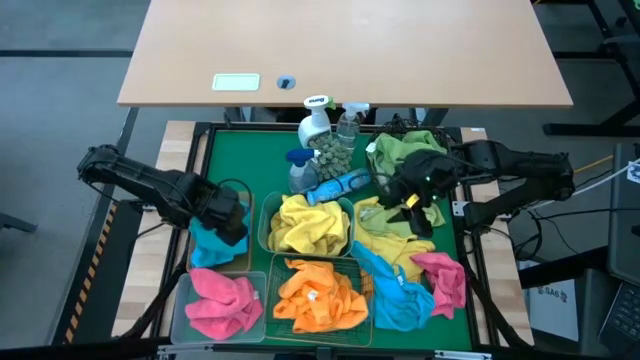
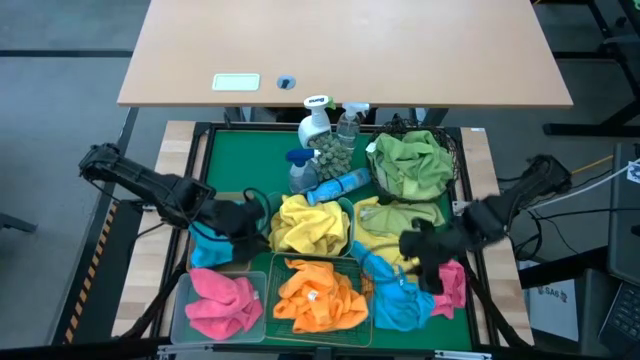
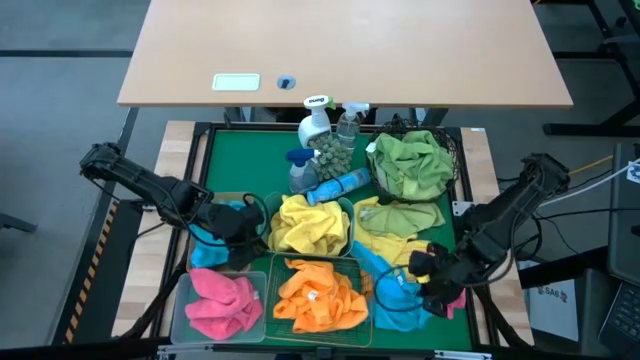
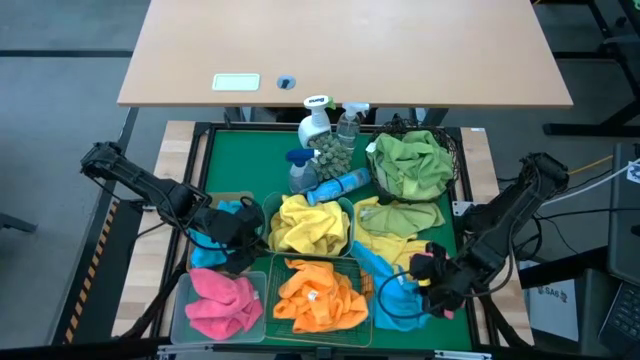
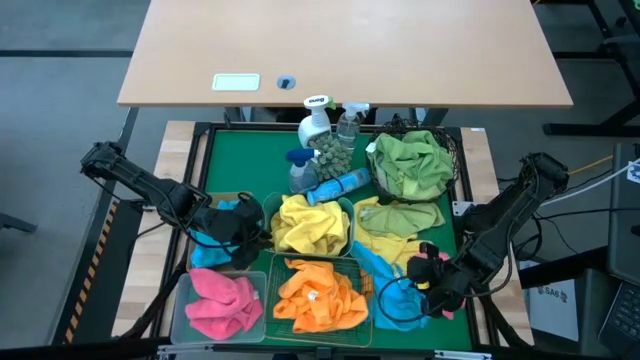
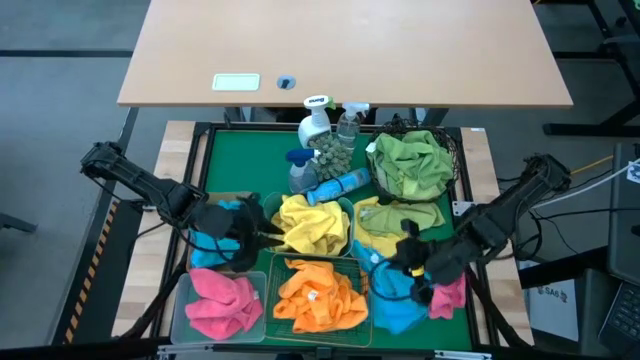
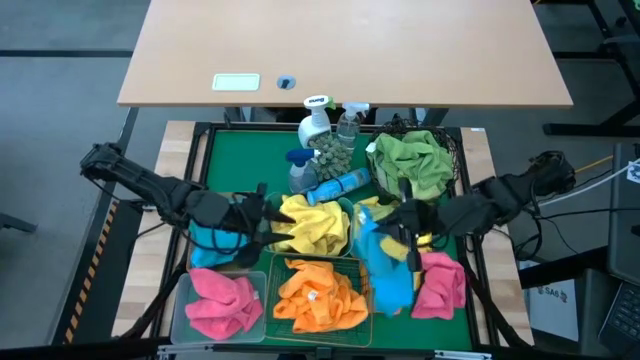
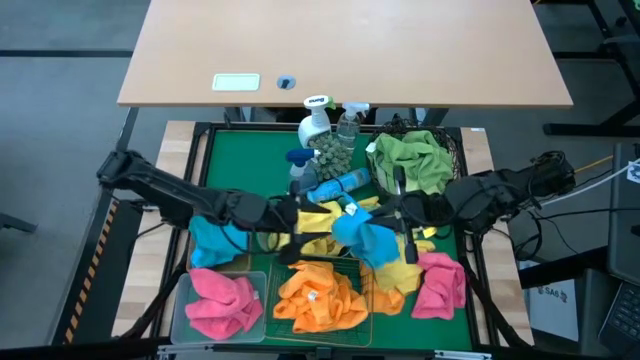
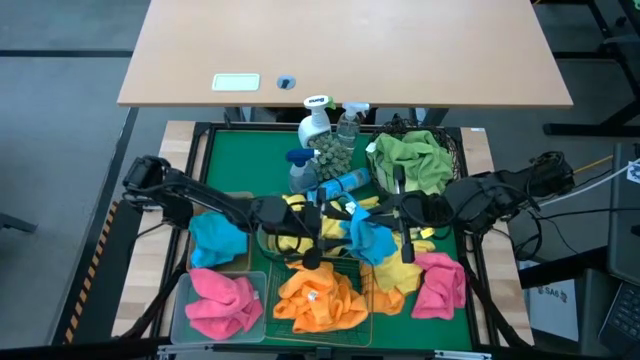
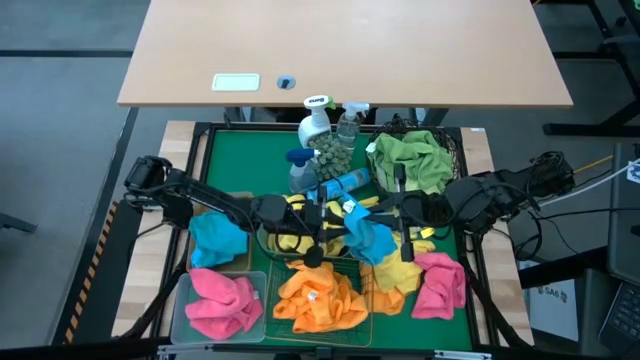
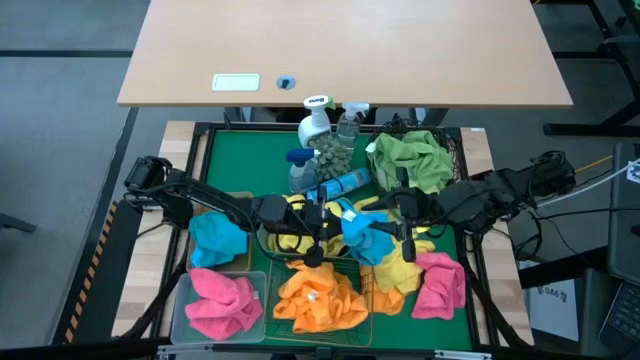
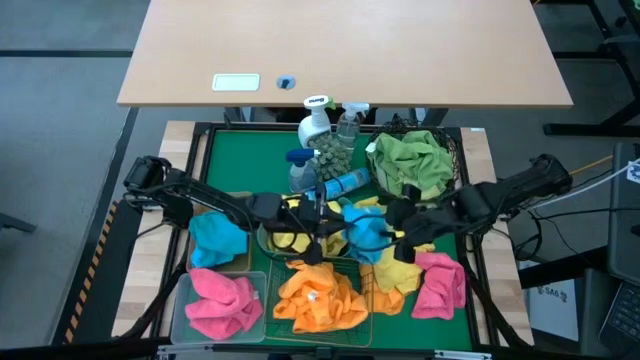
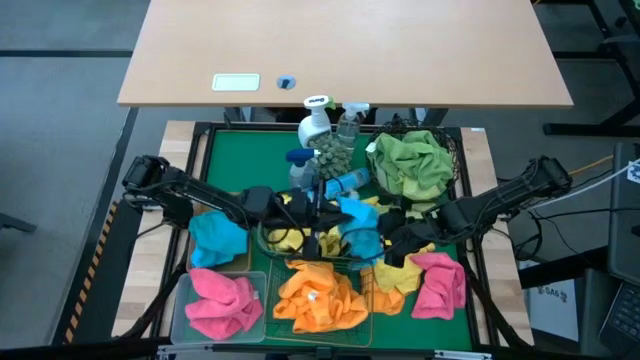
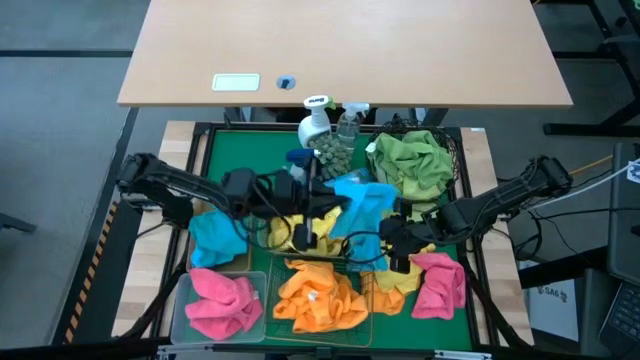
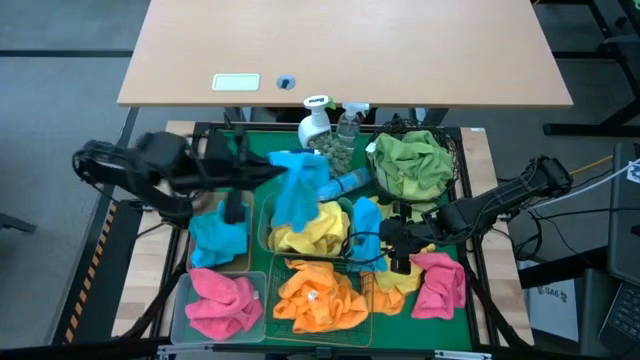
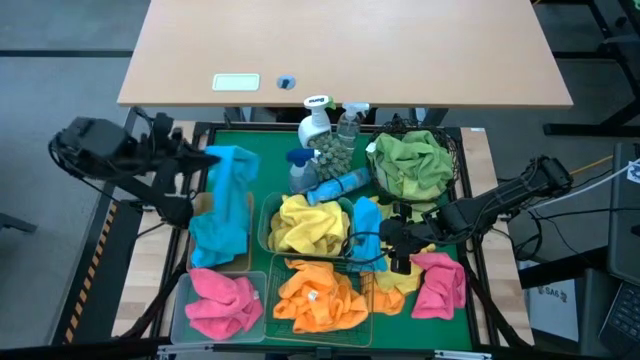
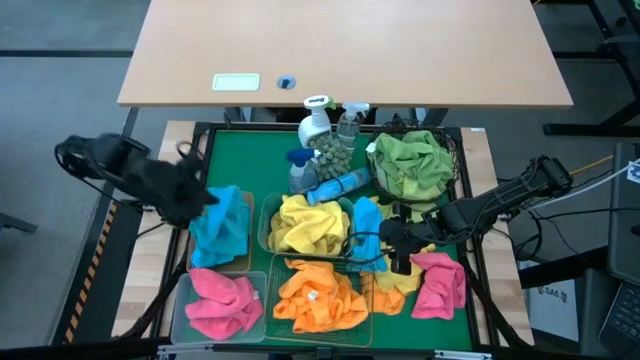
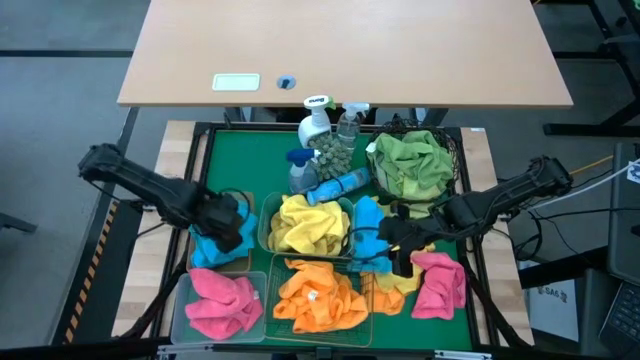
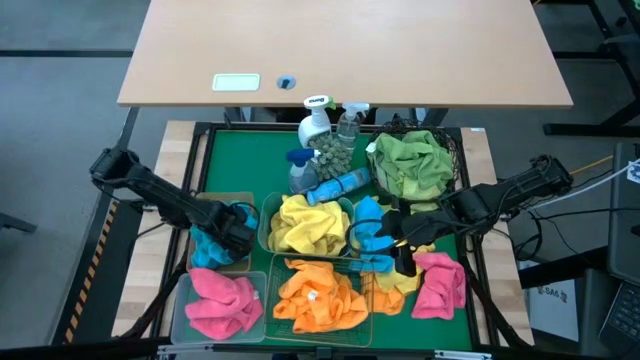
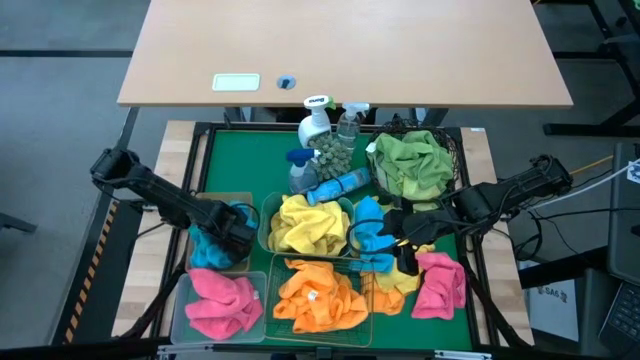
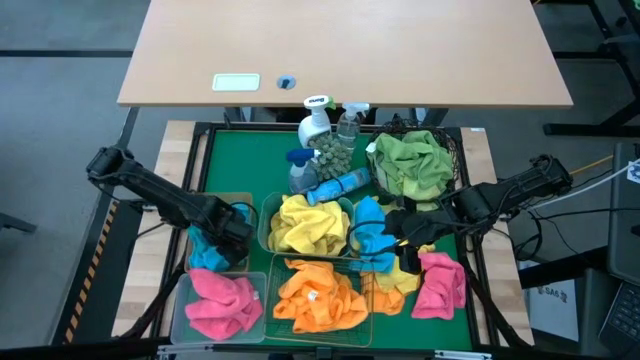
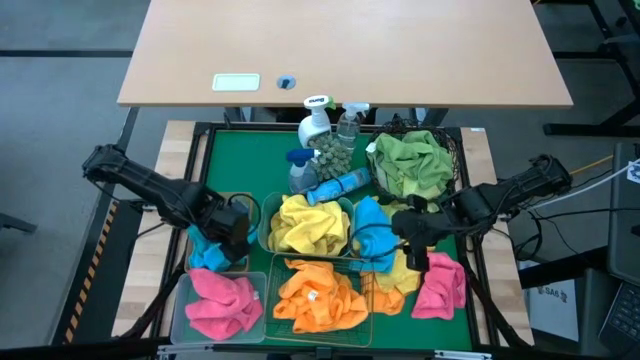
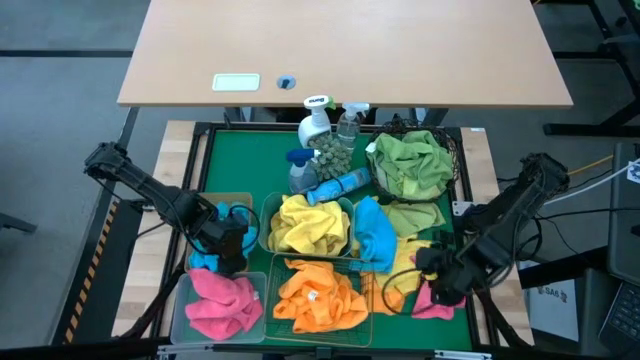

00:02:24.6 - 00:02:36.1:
Task: Sort microfiber towel by color & place in baskets
Put the blue microfiber towel into the orange bin

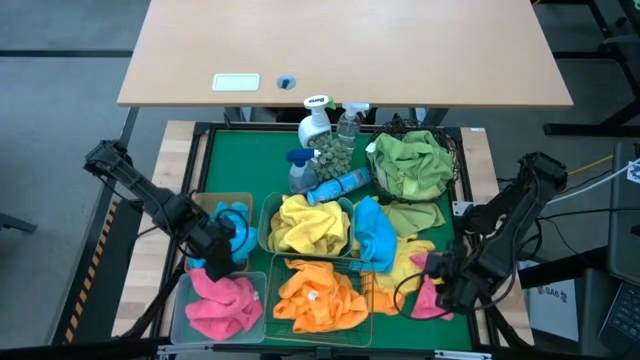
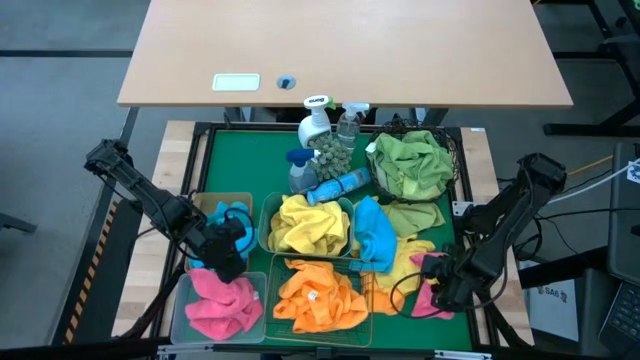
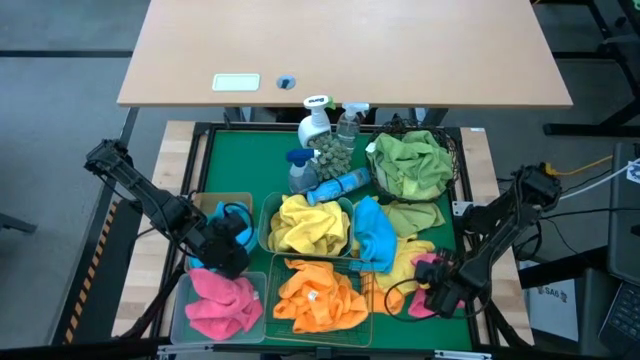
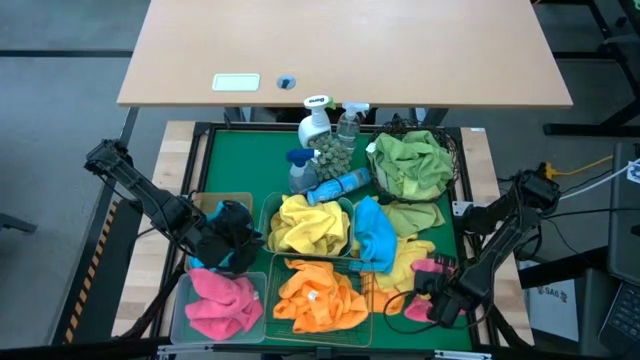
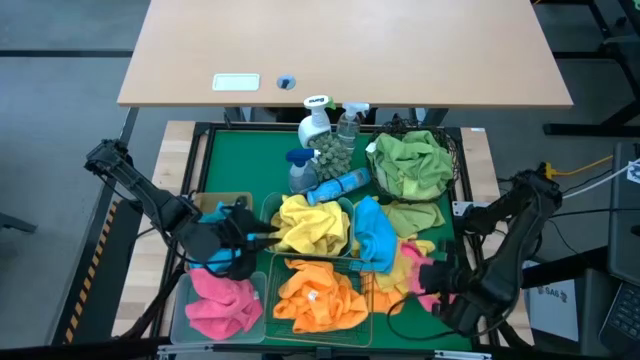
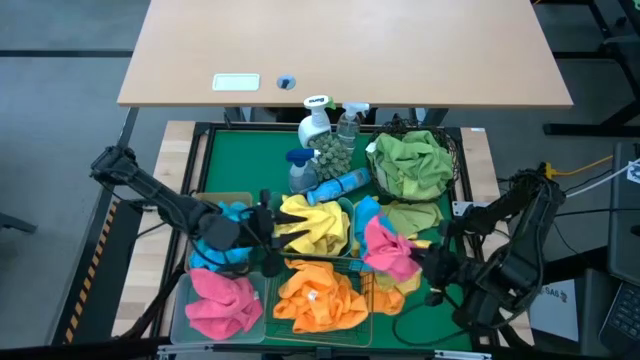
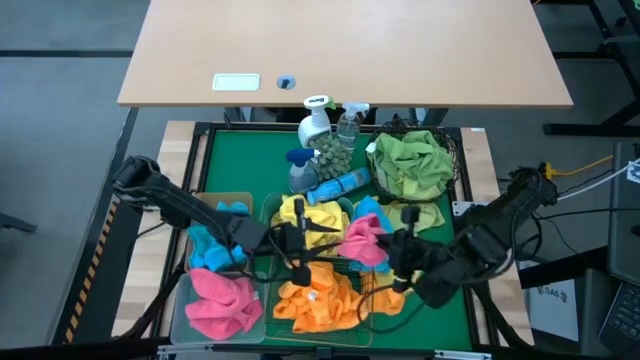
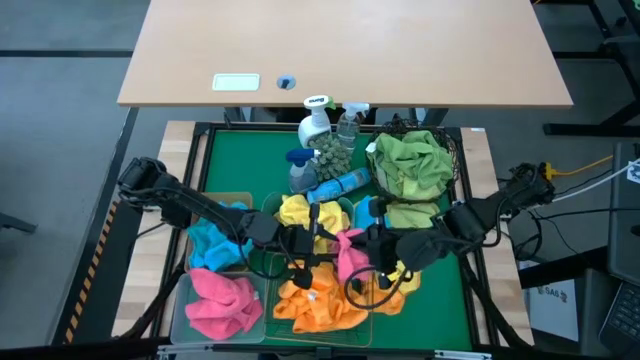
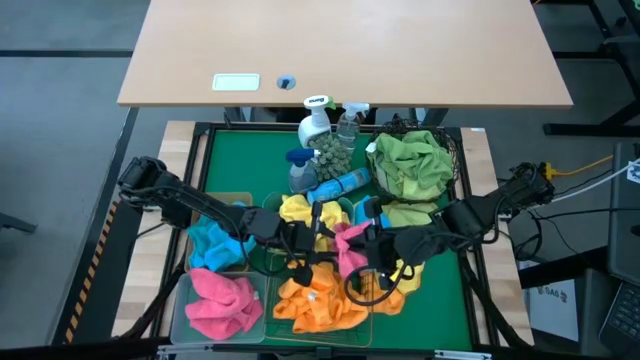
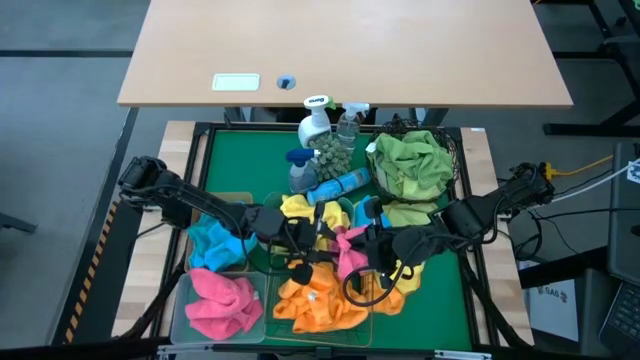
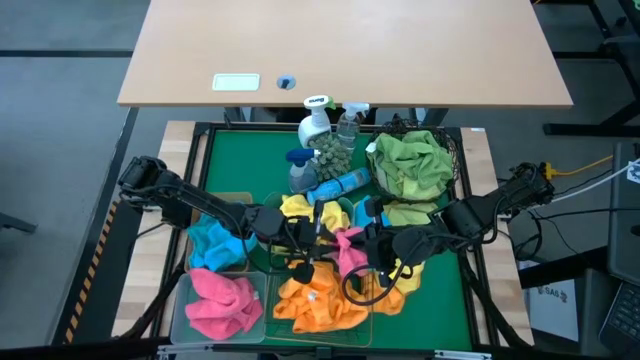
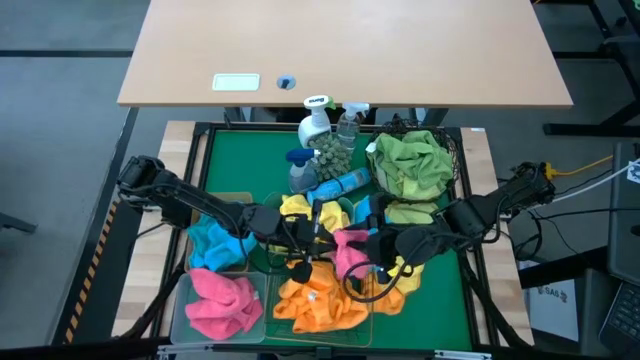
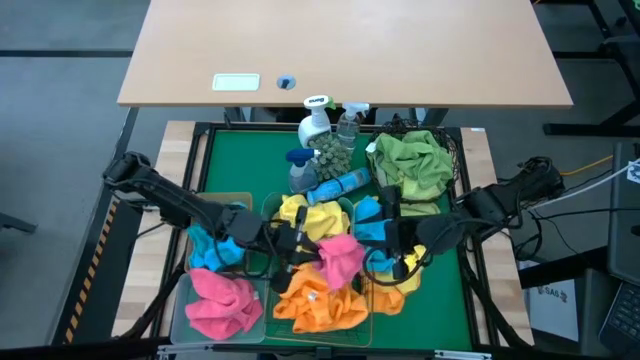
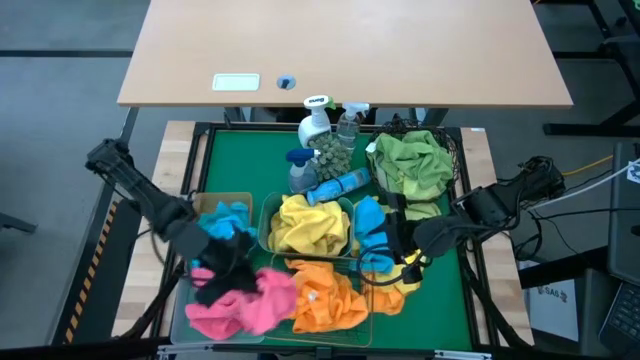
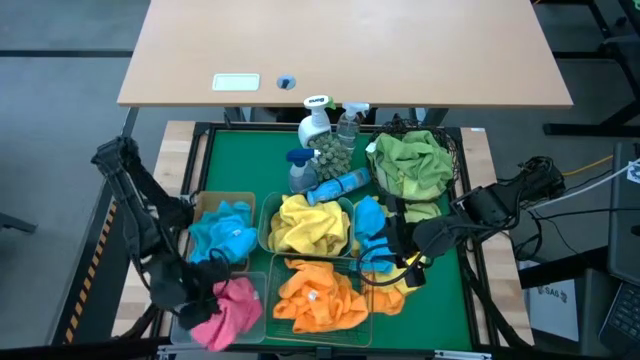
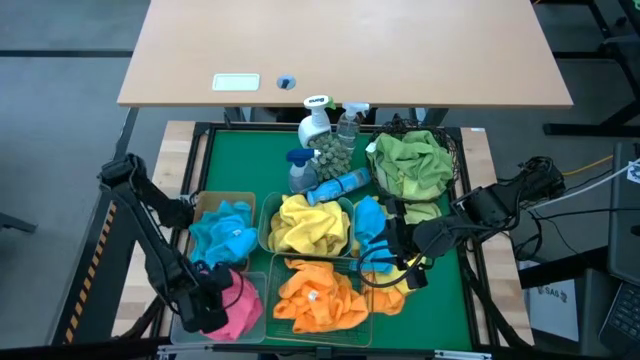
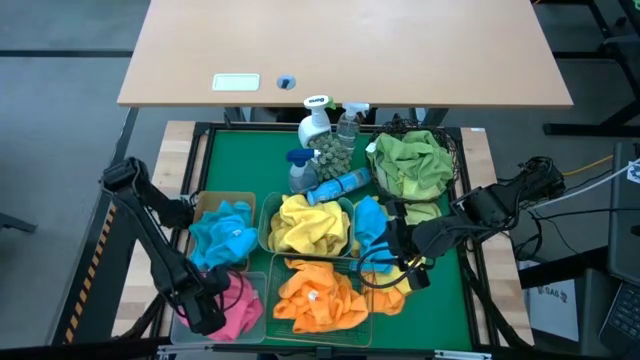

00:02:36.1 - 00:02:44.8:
Put the pink microfiber towel into the transparent bin

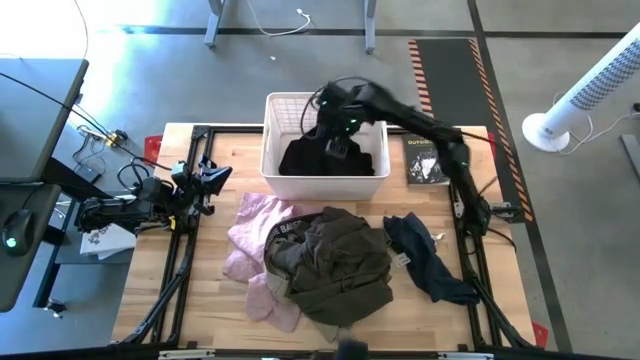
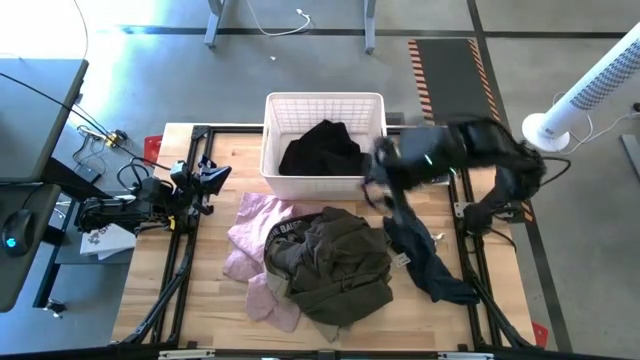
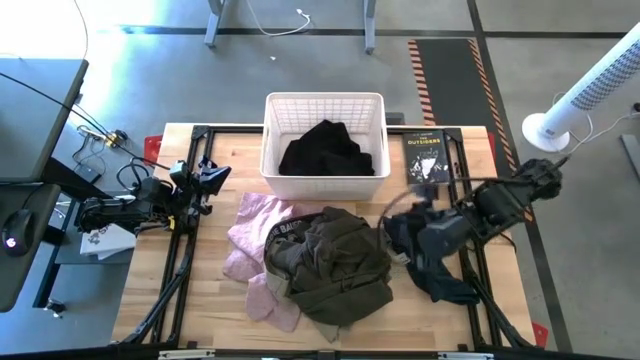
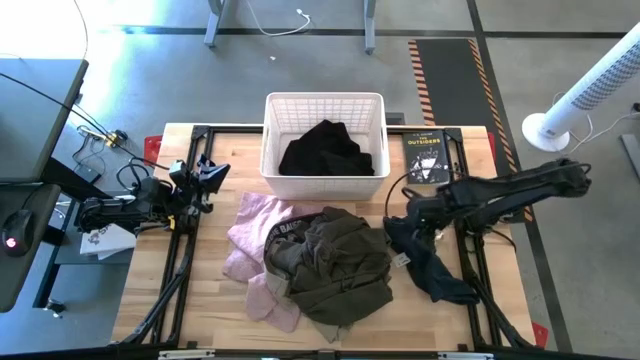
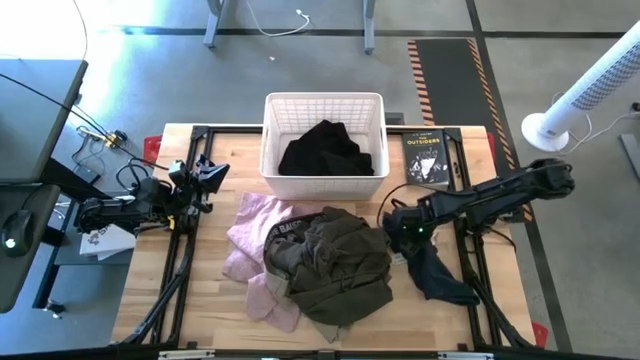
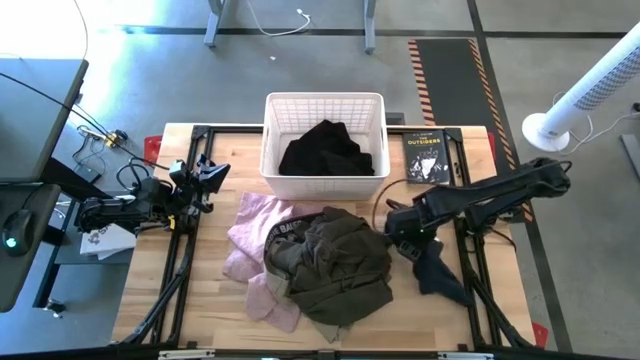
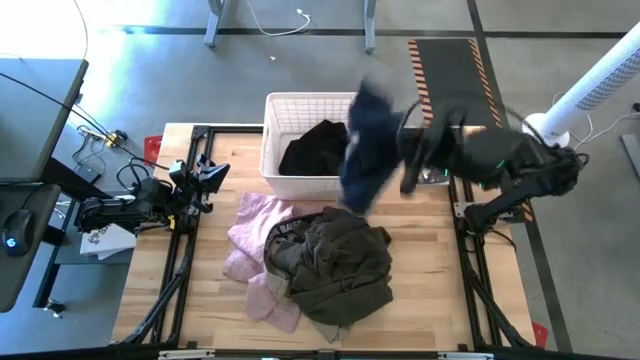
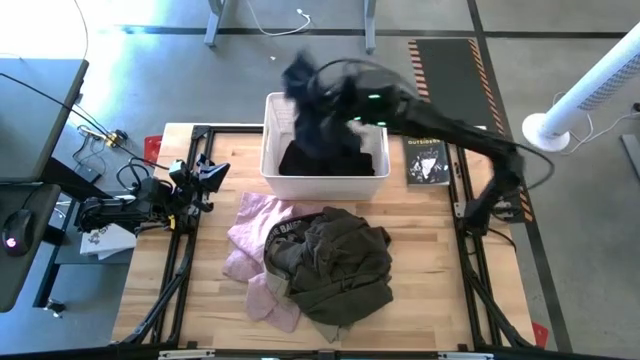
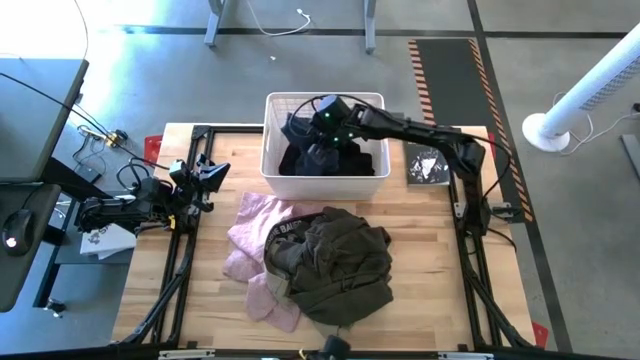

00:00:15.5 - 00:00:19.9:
Task: Sort clothes
Put the blue shirt into the white bin
